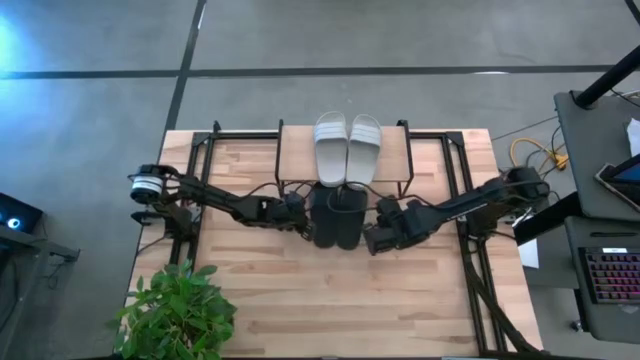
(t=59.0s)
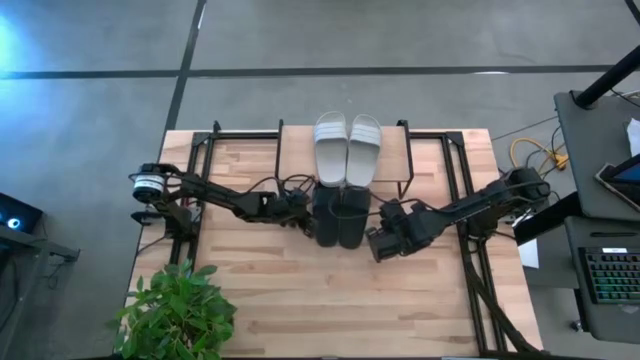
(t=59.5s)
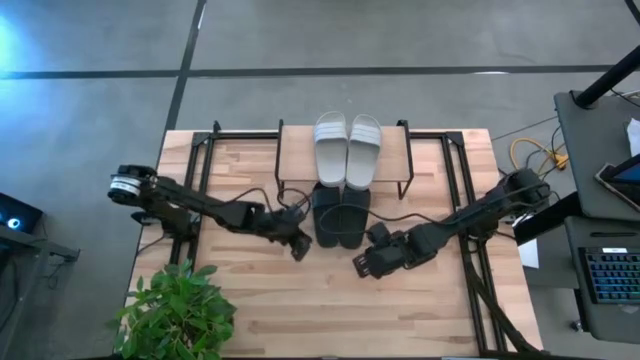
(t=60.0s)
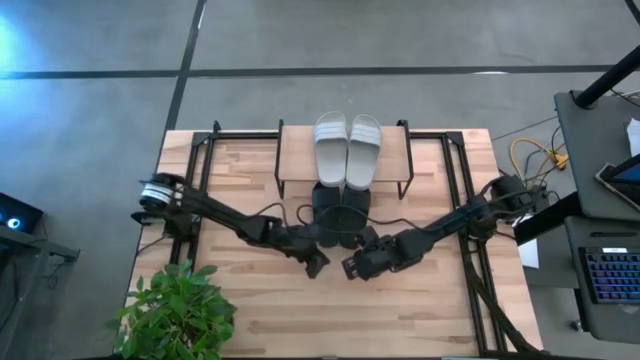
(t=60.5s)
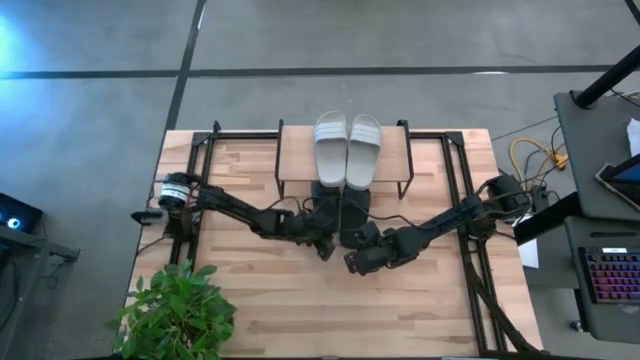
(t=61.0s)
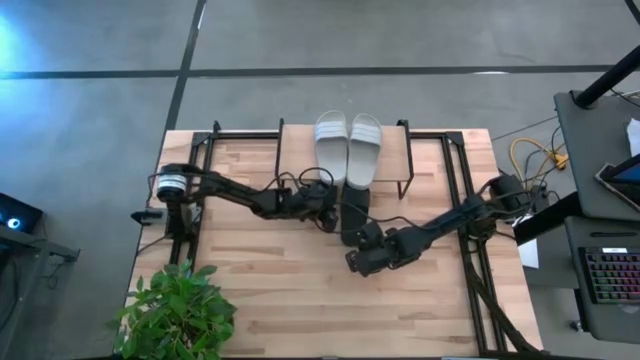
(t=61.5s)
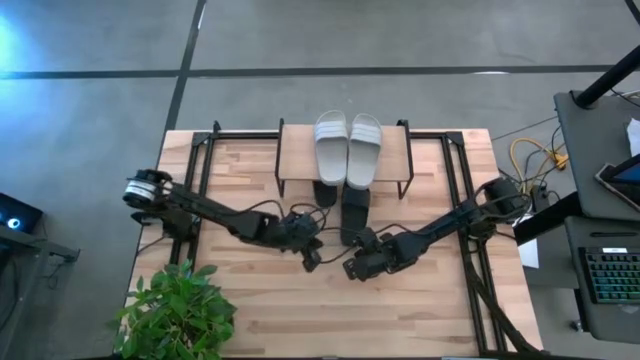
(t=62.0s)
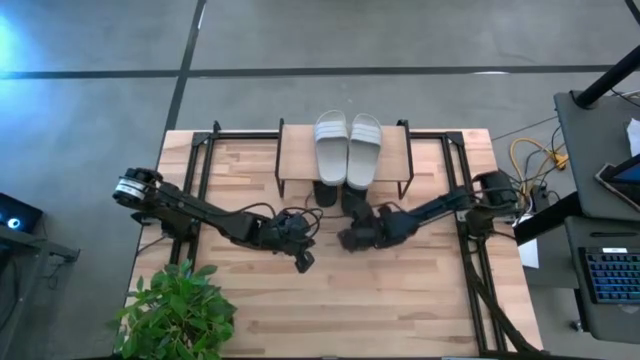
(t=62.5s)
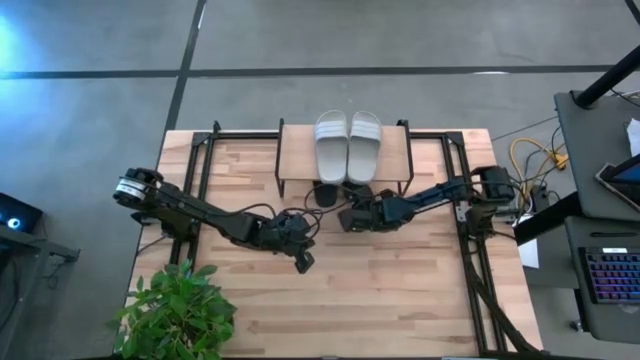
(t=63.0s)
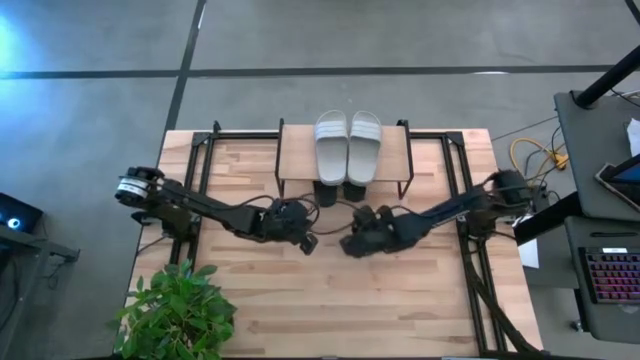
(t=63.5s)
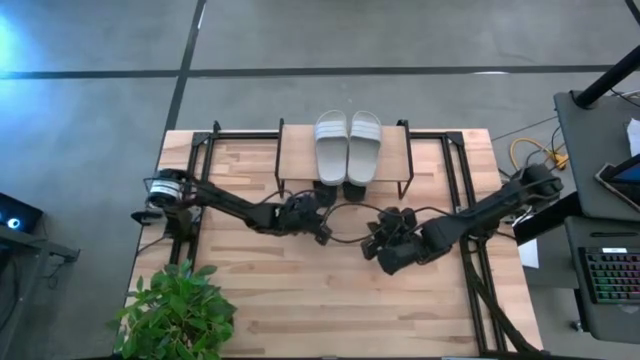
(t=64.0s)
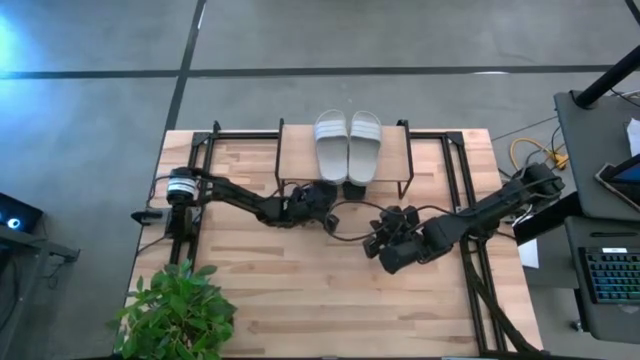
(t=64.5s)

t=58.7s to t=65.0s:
Task: Pick and place slides into the shelf
Adjust the black slides

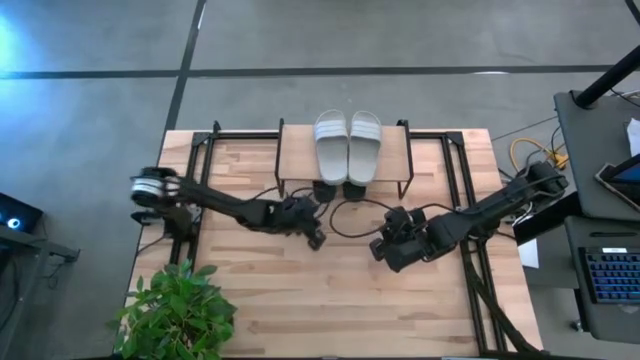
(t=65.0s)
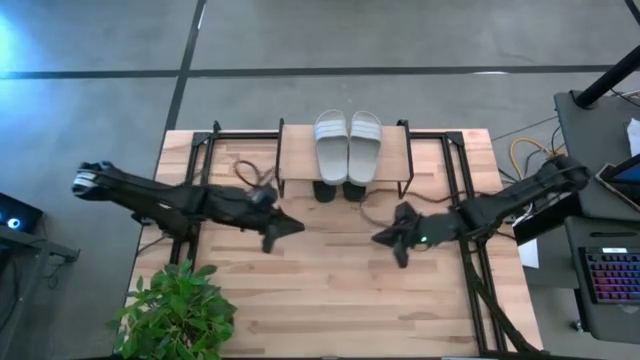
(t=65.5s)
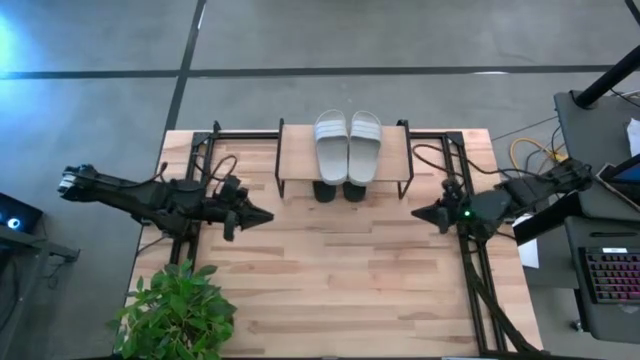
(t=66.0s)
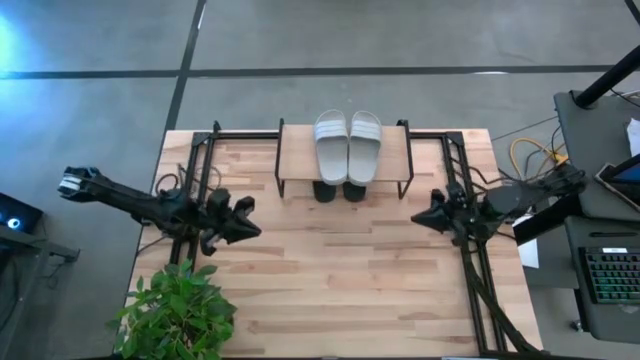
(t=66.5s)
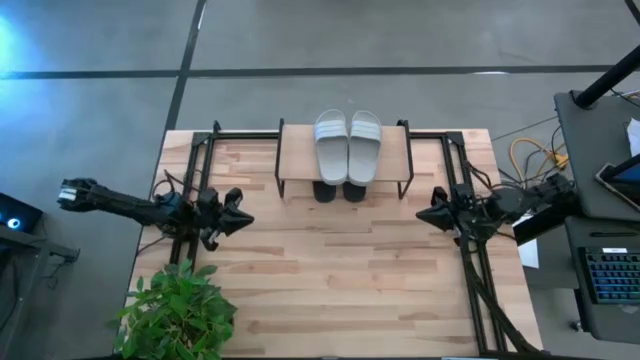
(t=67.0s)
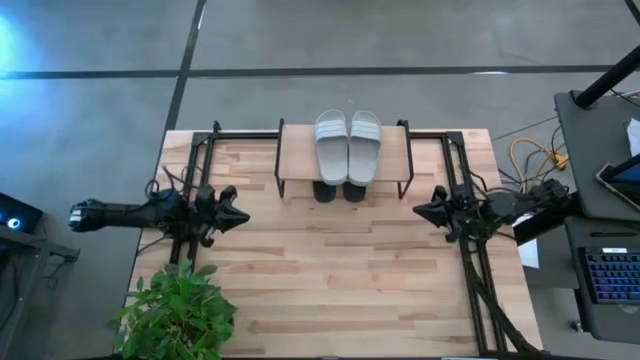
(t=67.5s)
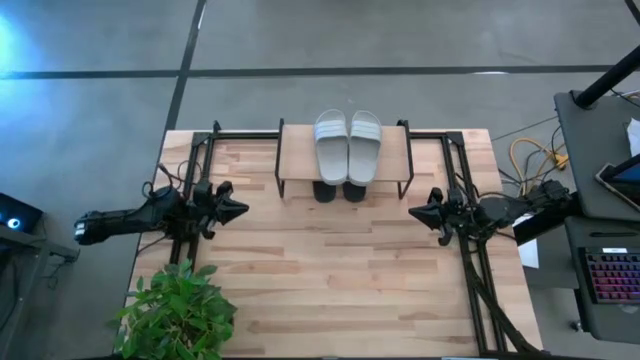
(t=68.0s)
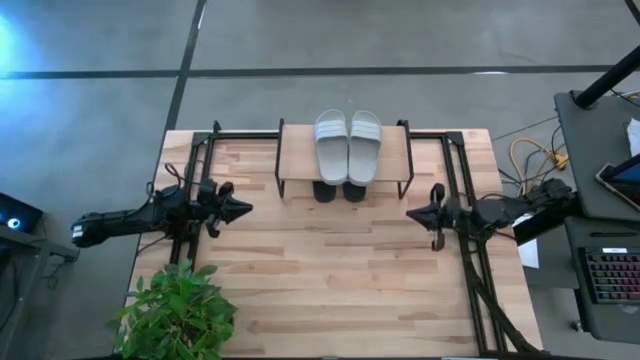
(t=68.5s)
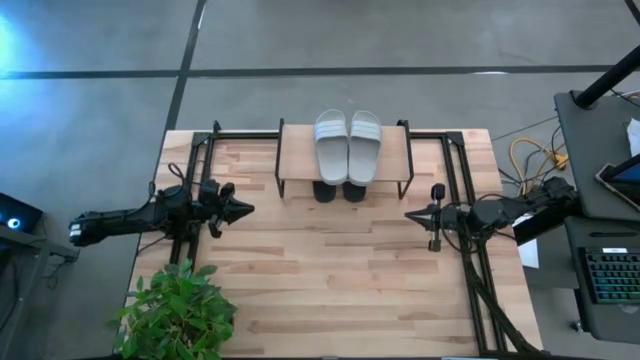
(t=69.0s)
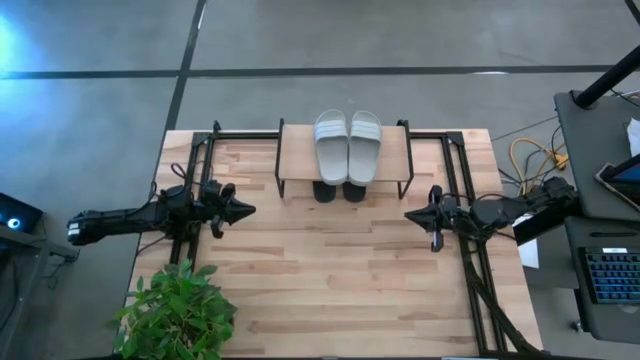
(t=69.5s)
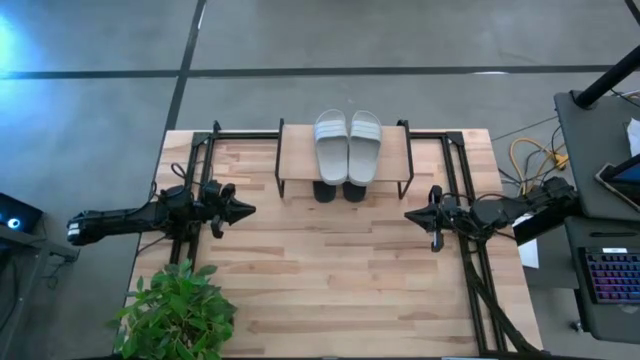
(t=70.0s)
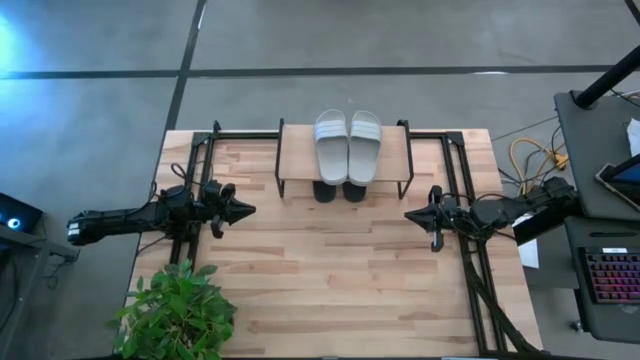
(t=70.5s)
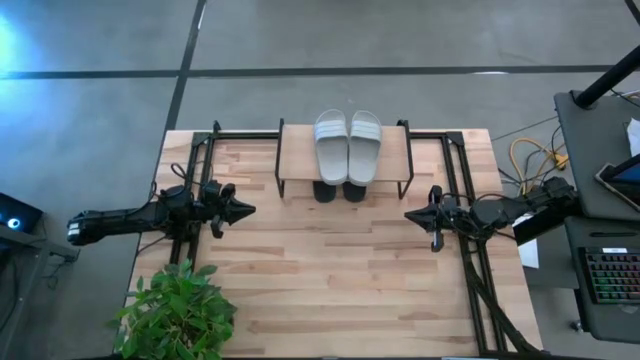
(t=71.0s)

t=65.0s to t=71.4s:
Return to Home Position

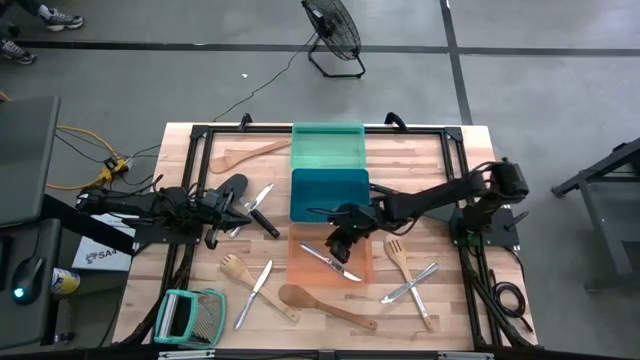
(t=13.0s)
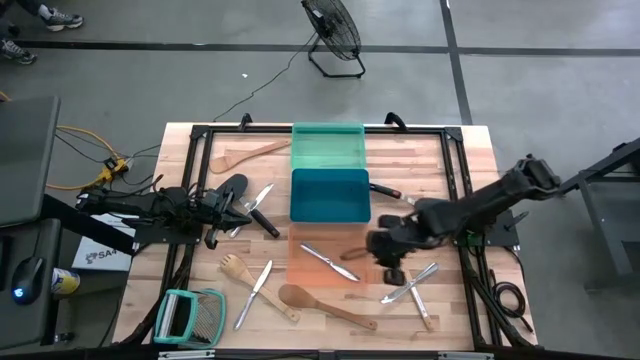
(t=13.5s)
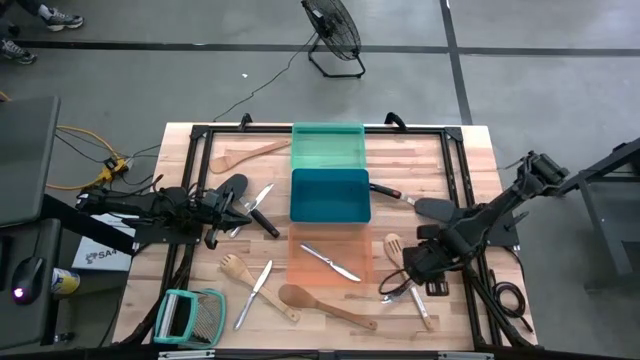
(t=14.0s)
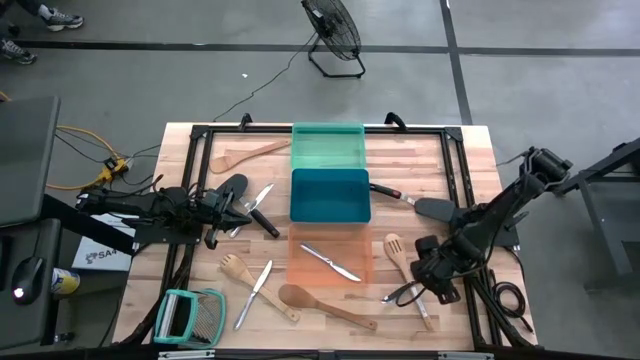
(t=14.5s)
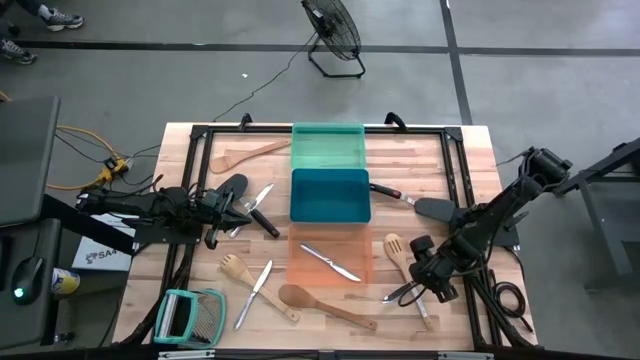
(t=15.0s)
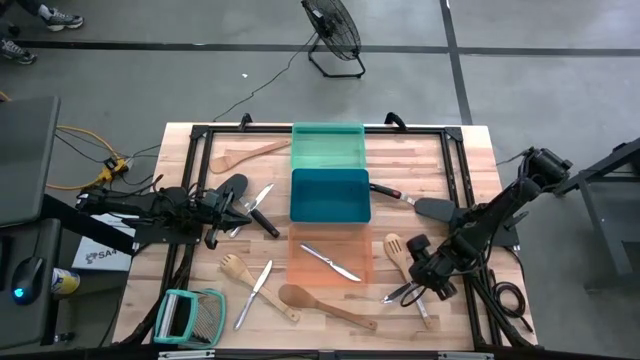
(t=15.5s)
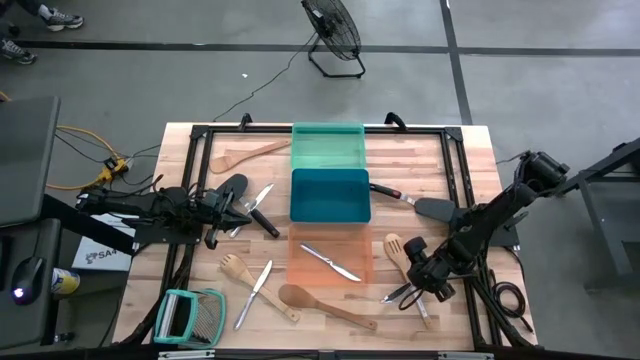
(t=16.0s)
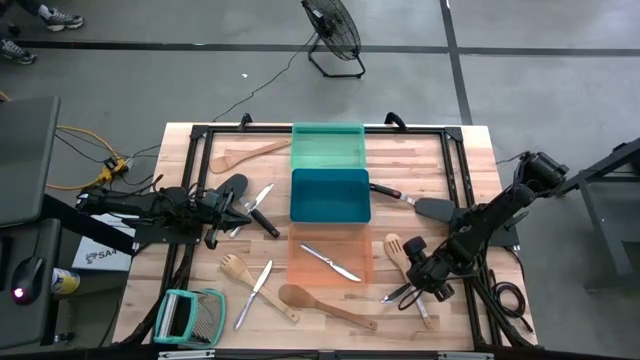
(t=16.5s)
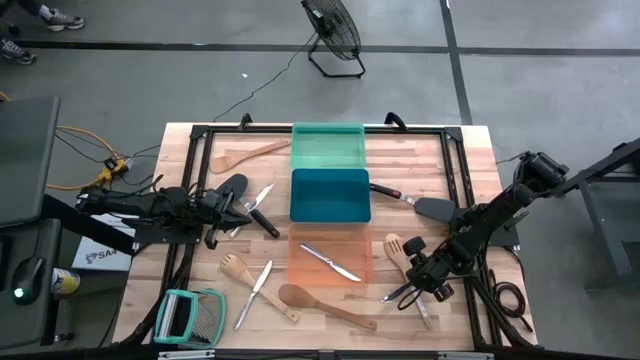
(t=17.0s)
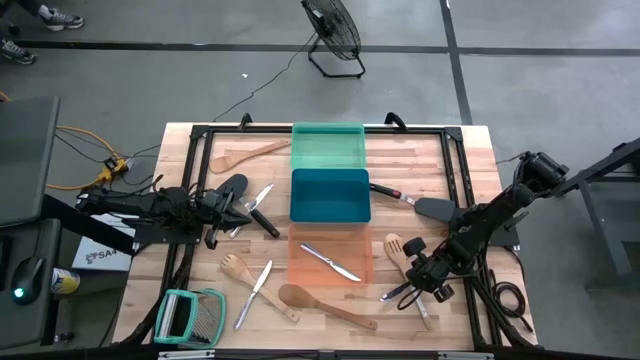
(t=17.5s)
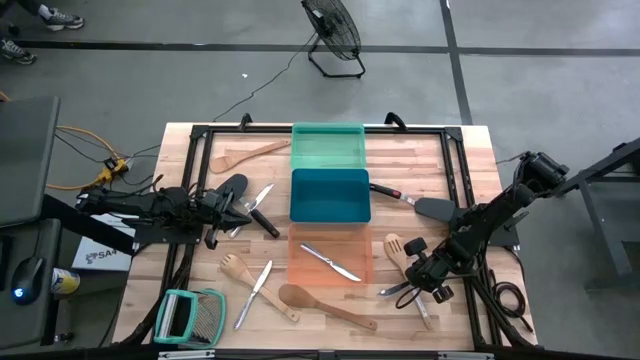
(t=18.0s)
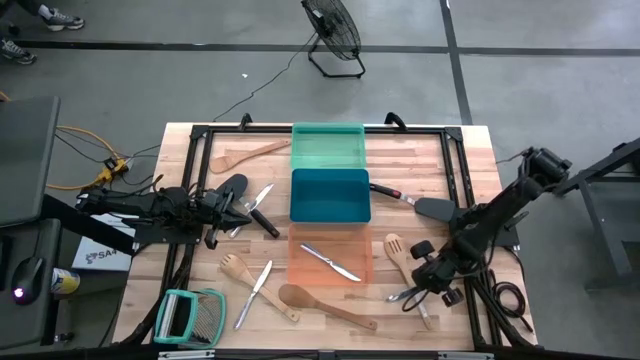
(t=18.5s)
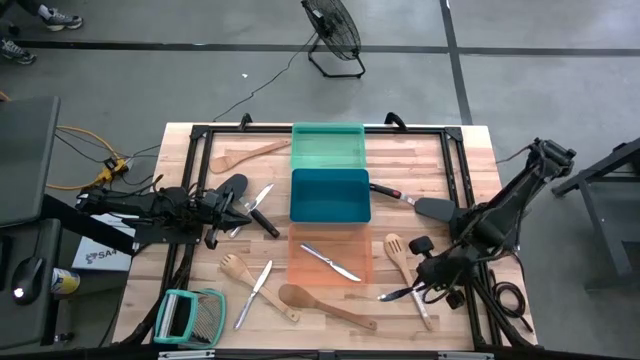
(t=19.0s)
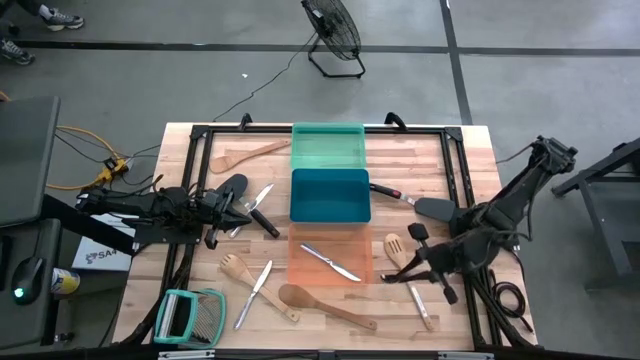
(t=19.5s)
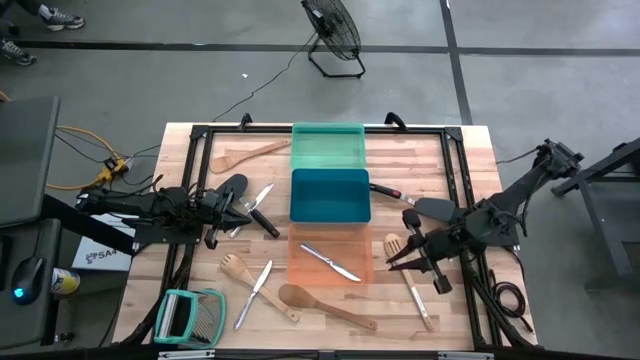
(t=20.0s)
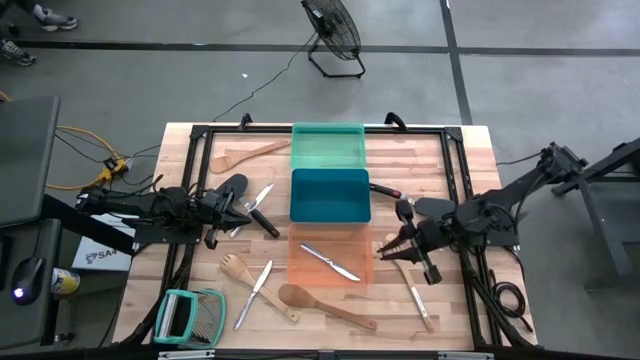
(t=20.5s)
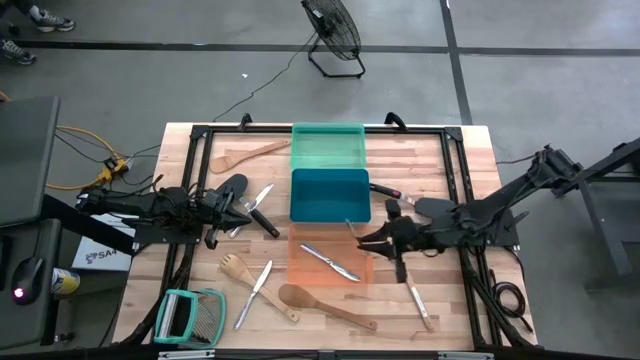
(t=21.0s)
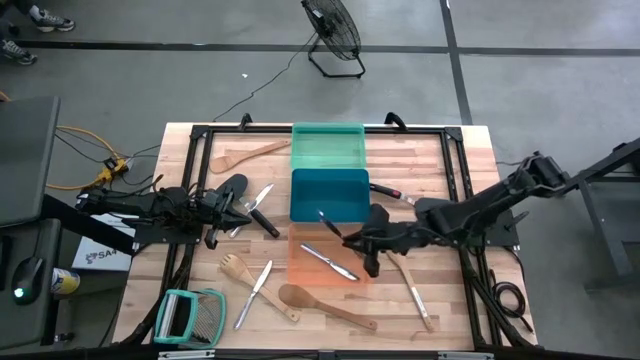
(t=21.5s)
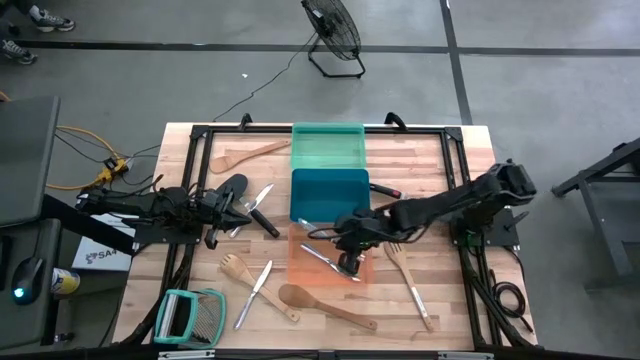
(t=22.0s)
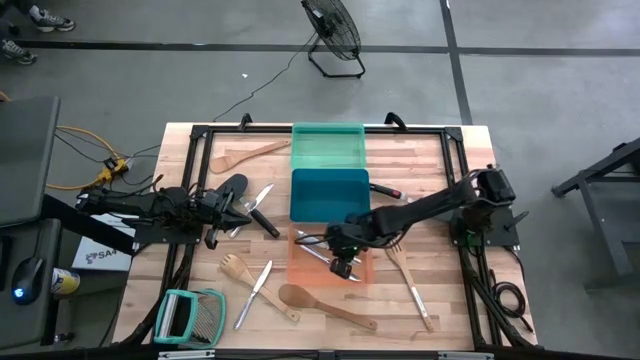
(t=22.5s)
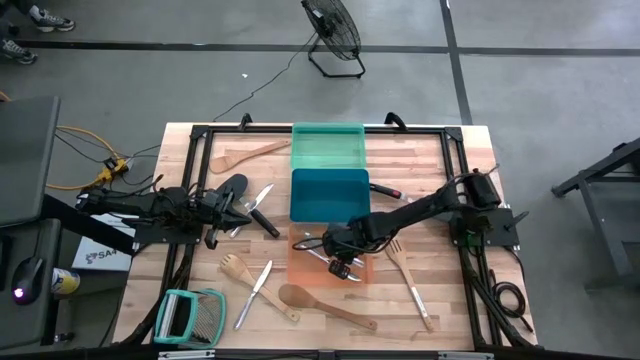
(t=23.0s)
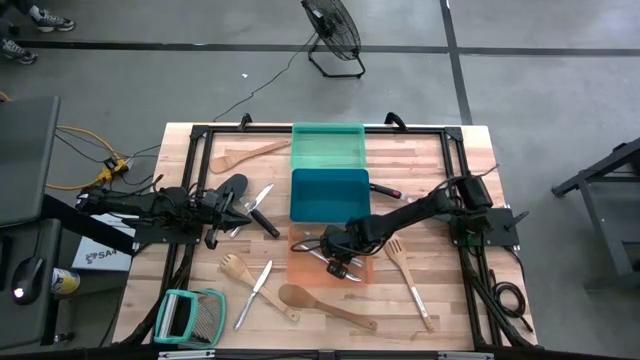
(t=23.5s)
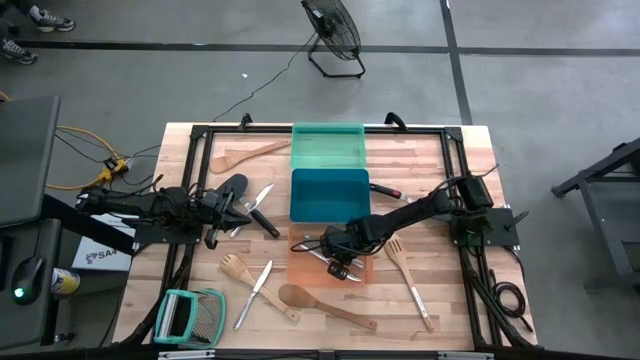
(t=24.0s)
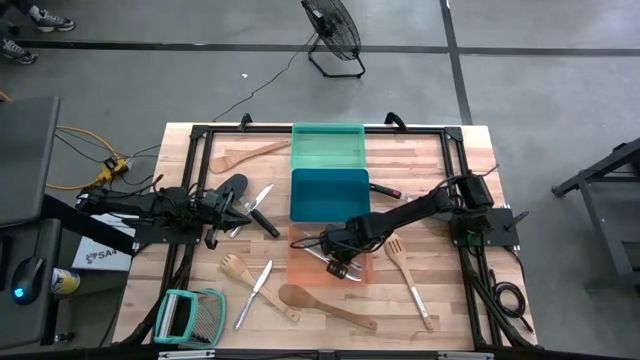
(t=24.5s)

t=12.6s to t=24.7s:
Task: Pick & Place Kitchen Items
Put the silver knife into the orange bin
